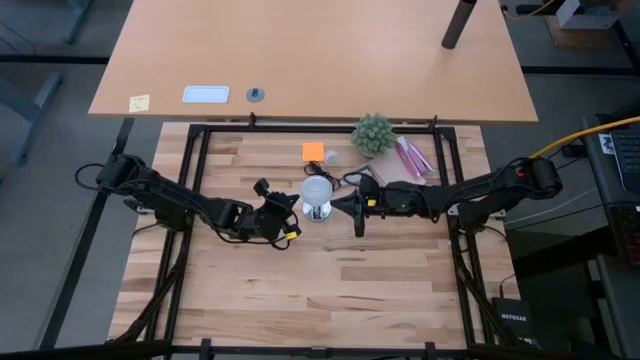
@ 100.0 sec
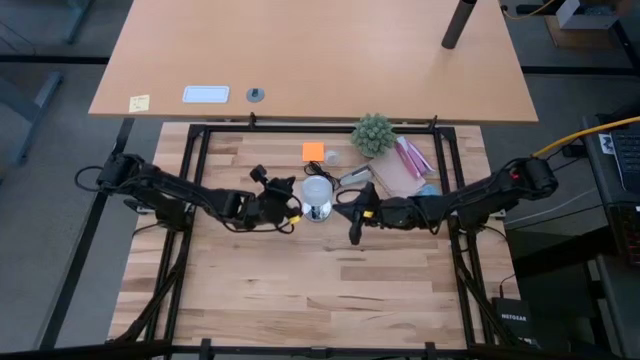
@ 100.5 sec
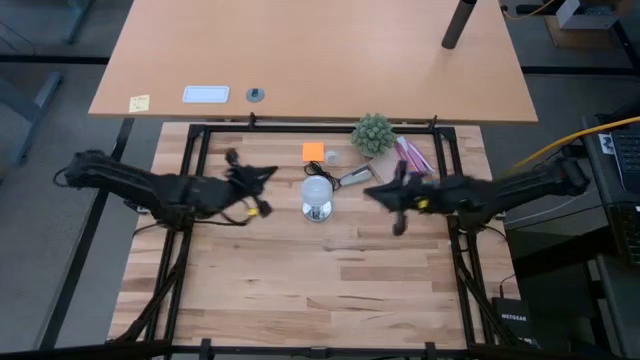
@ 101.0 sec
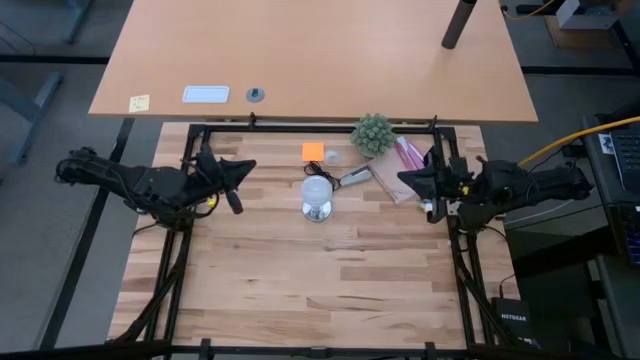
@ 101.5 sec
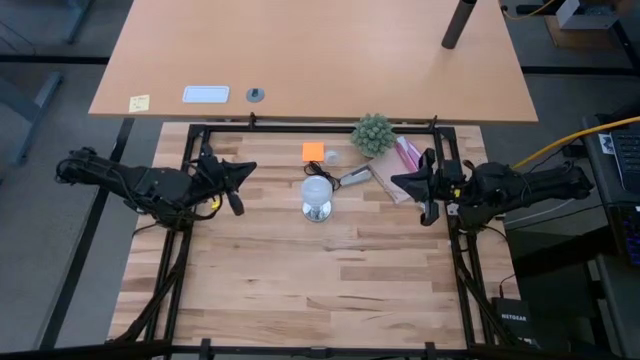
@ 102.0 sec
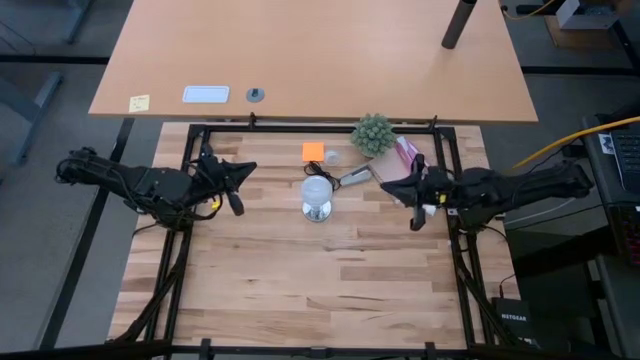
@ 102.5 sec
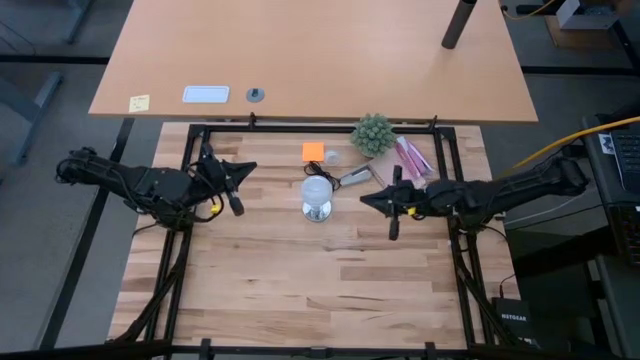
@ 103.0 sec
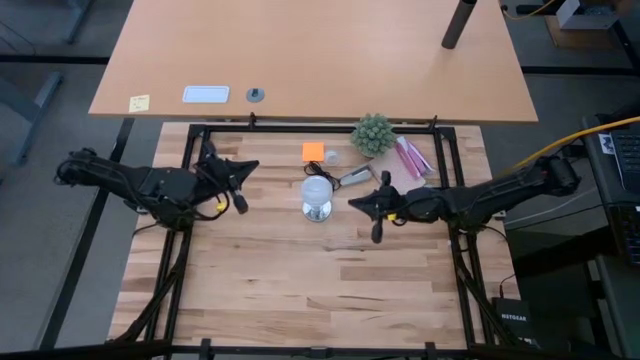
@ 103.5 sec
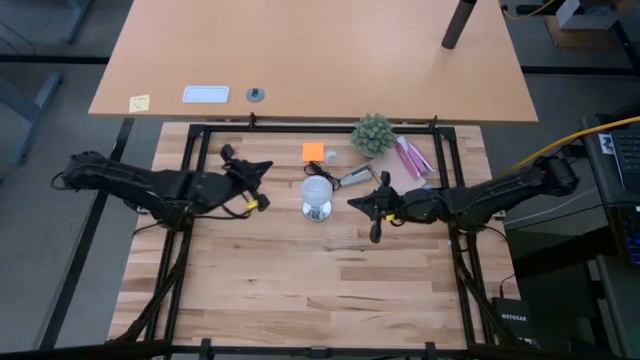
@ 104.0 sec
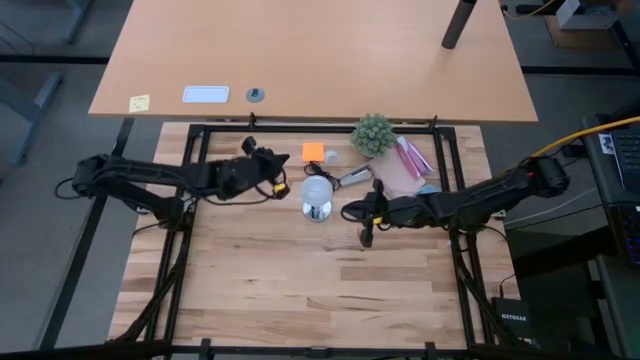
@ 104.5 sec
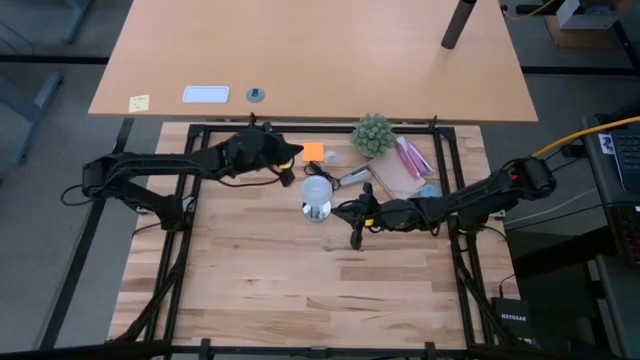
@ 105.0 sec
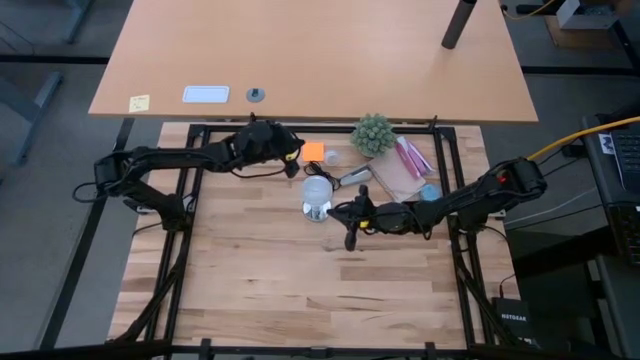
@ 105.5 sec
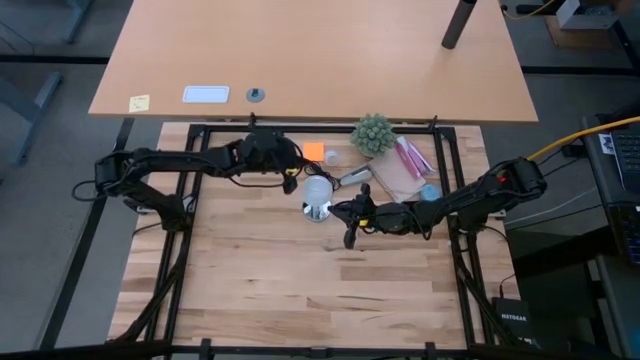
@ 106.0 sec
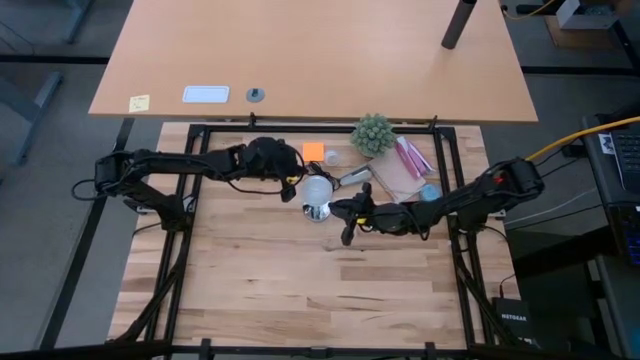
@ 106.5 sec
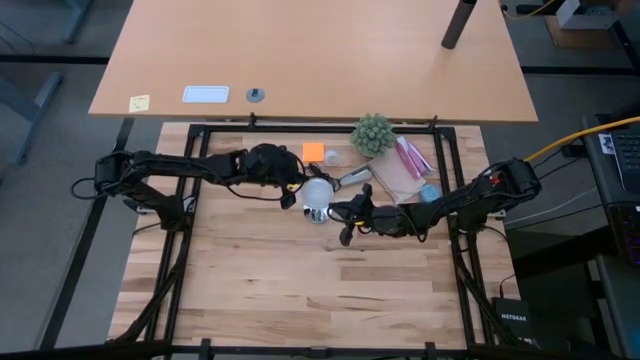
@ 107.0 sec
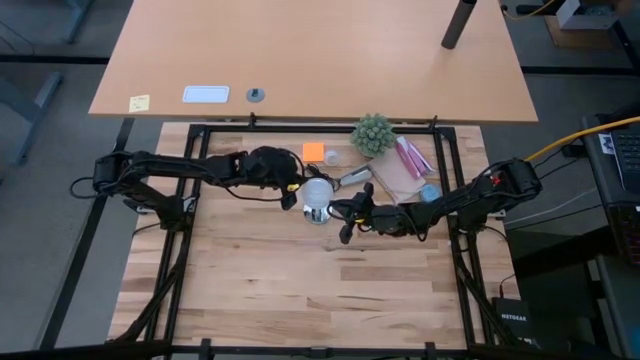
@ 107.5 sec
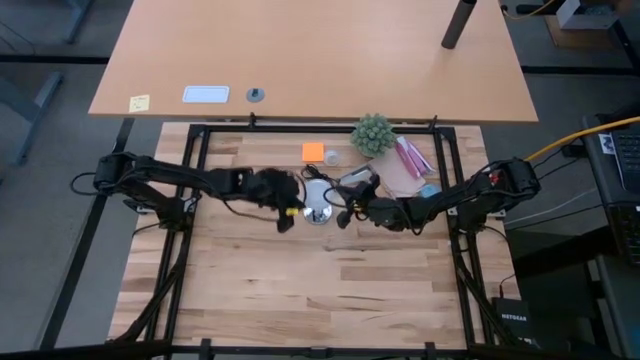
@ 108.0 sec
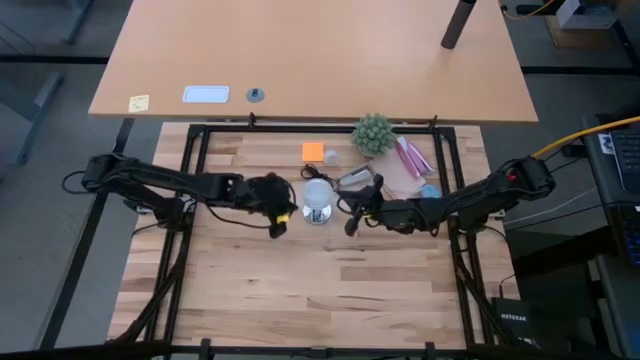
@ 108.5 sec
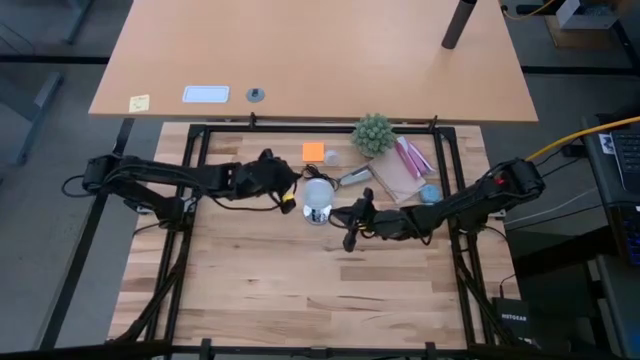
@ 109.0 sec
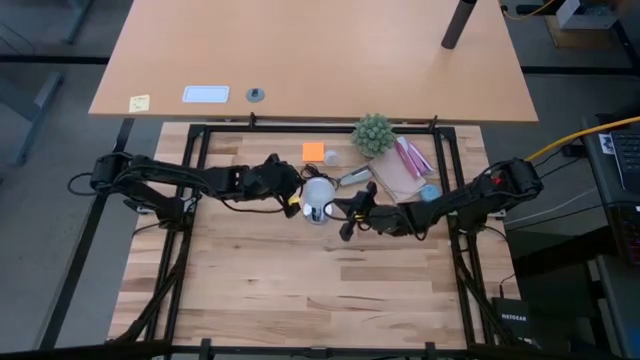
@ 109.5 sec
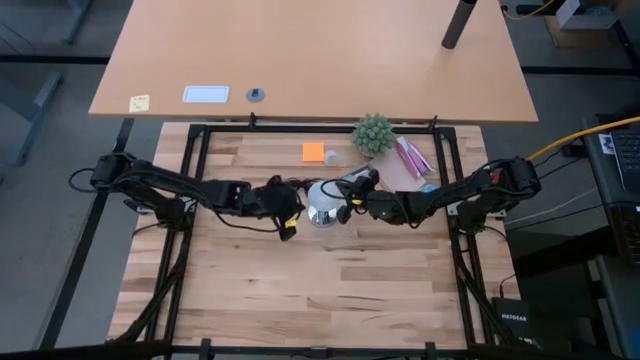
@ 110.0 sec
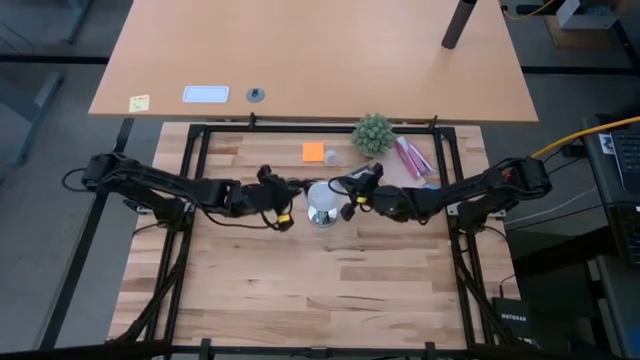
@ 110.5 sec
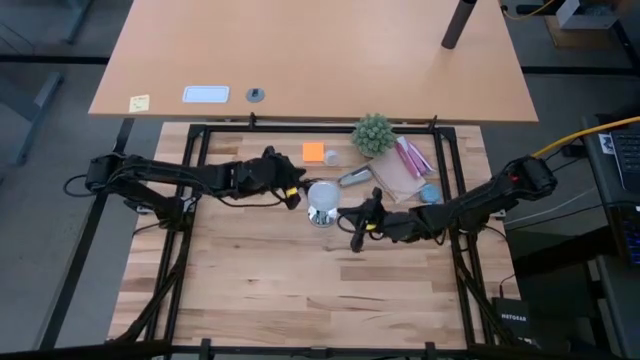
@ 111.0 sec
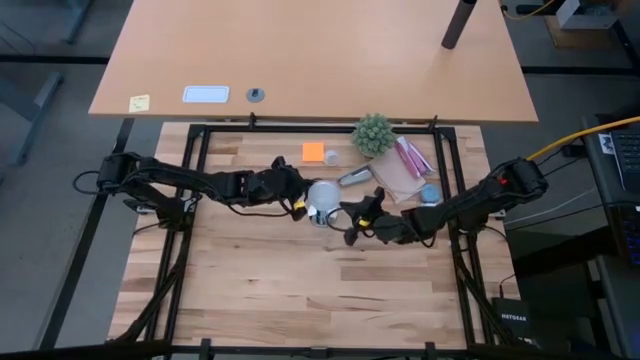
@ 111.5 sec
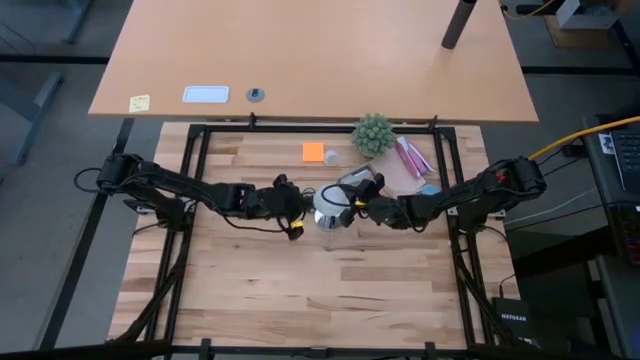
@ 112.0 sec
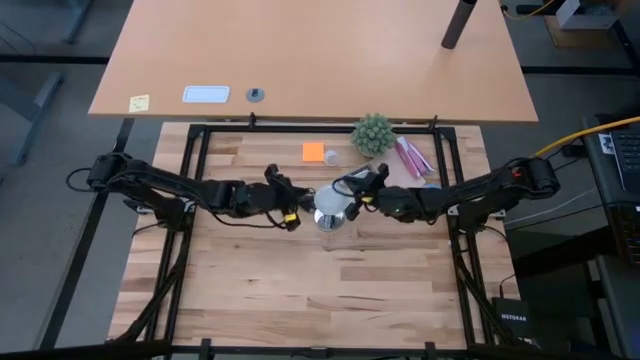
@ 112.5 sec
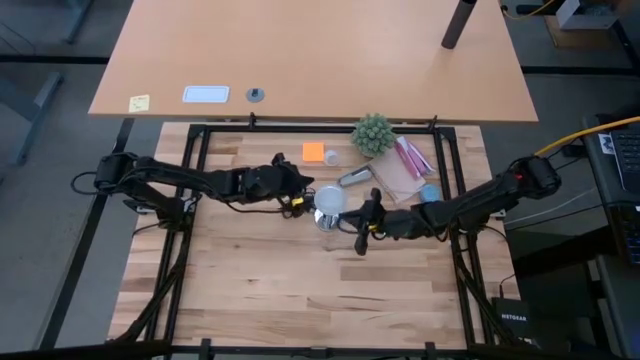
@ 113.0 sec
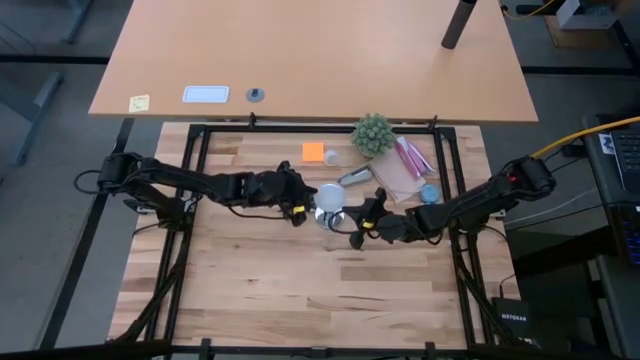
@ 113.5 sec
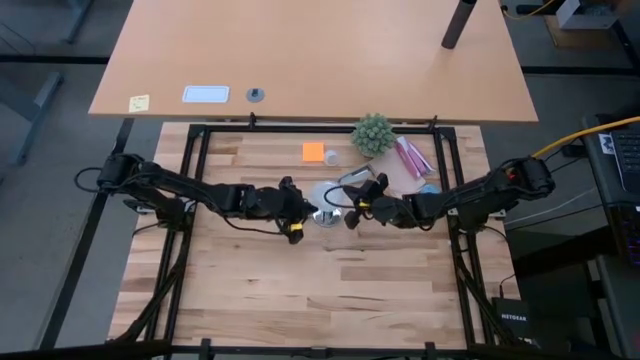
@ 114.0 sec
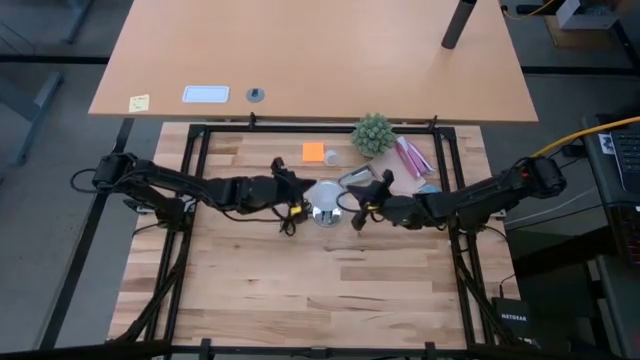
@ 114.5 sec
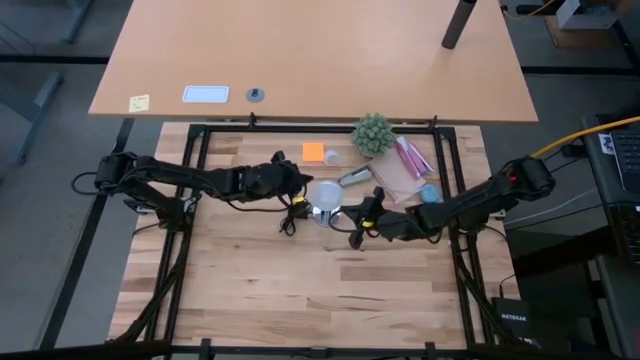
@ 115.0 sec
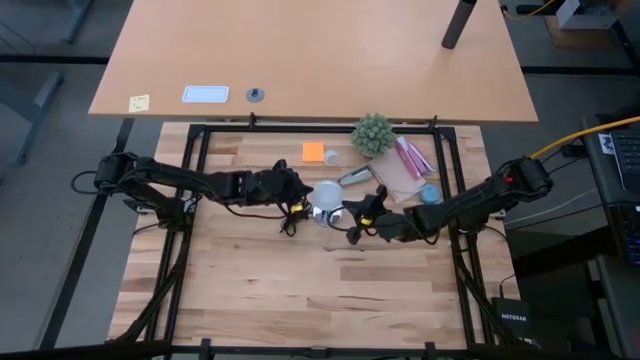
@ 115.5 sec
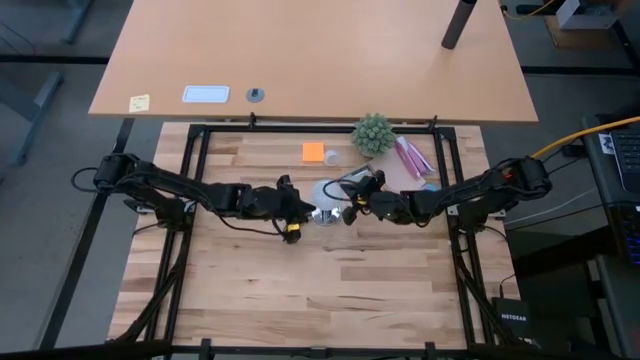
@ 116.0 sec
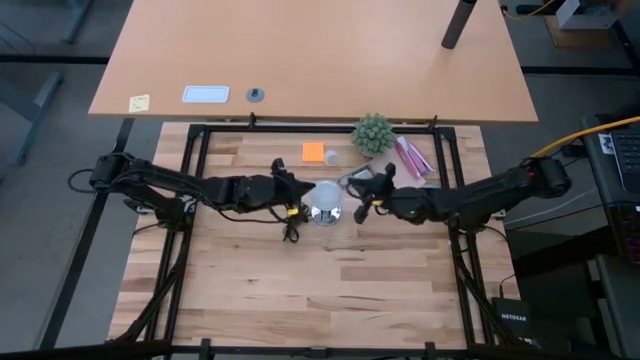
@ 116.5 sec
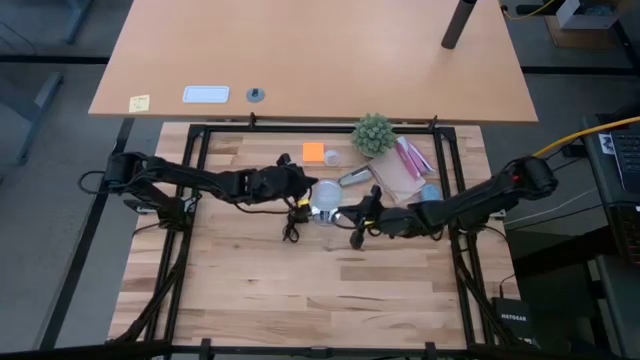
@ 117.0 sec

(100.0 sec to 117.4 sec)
Task: Screw lightbulb
Remove the lightbulb from the silver lamp
